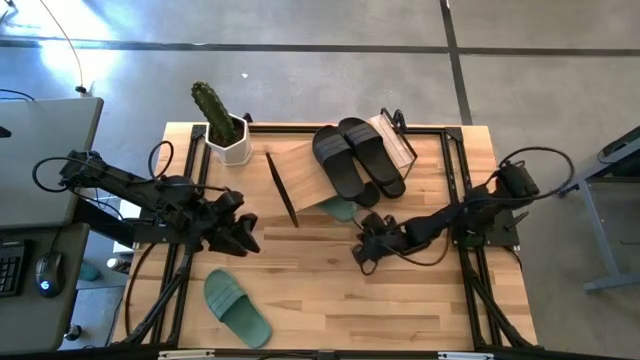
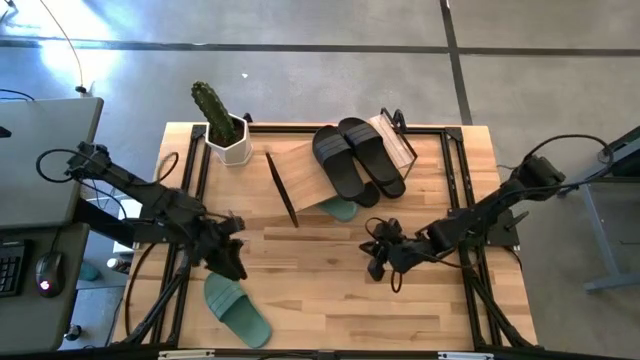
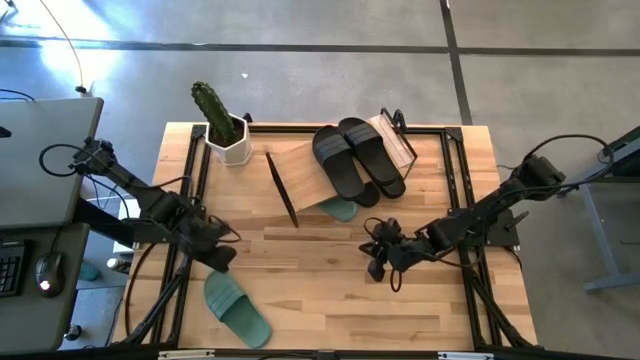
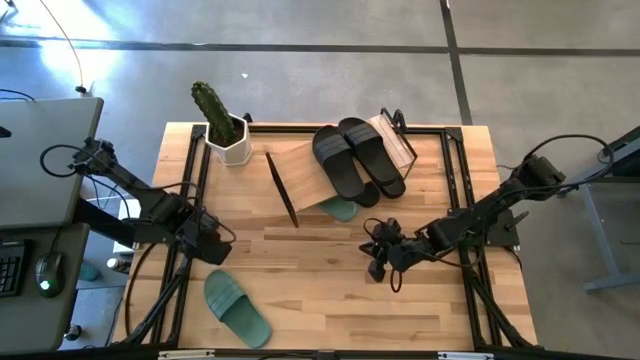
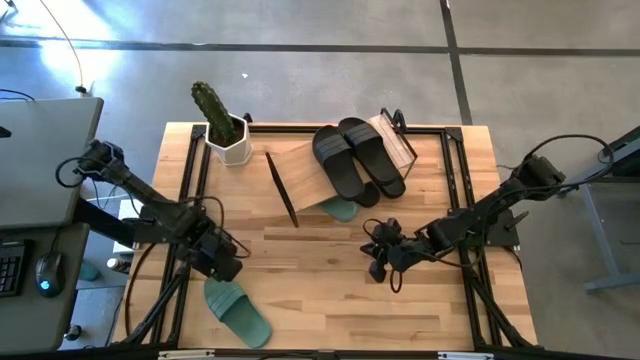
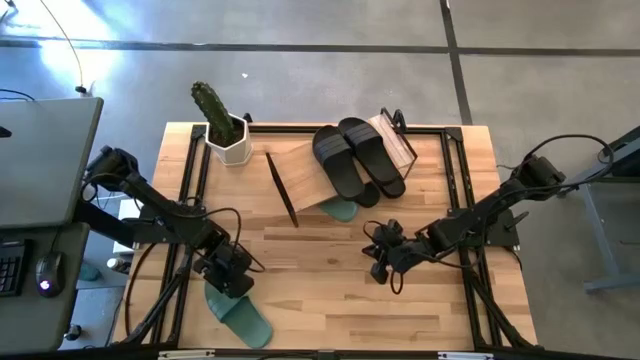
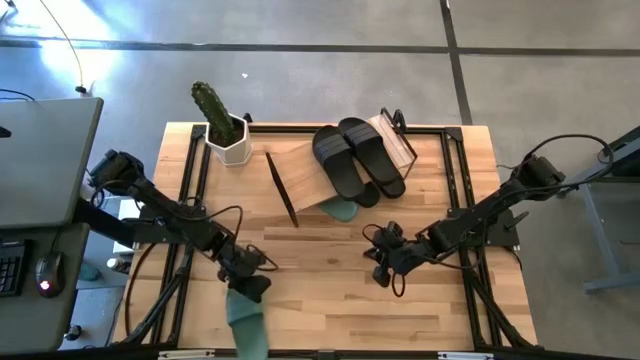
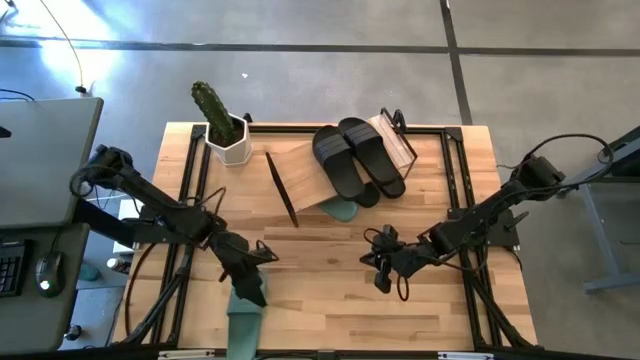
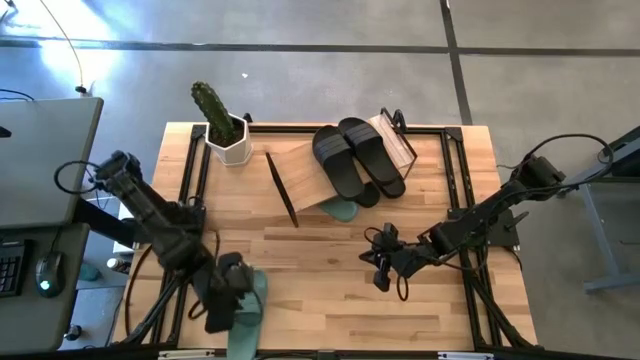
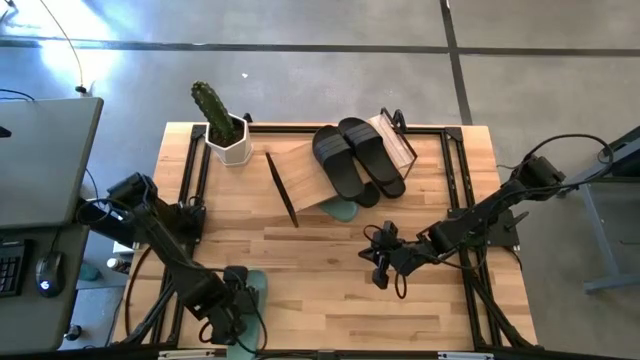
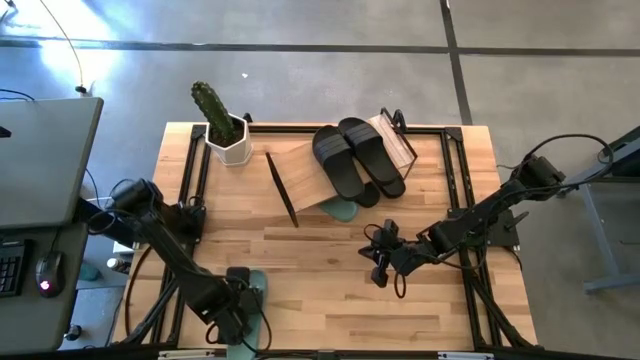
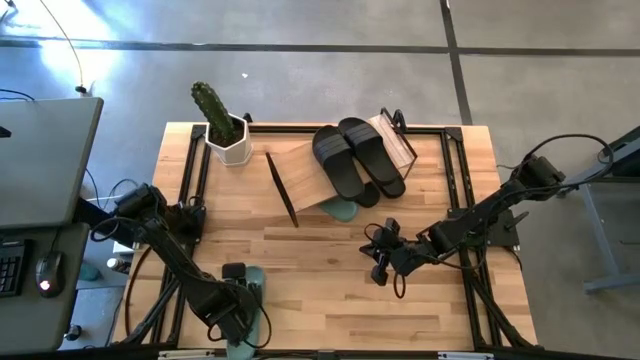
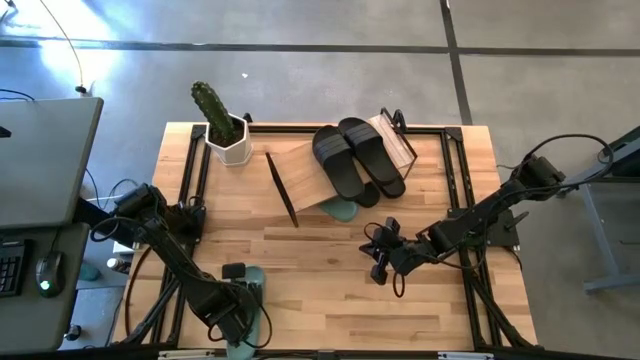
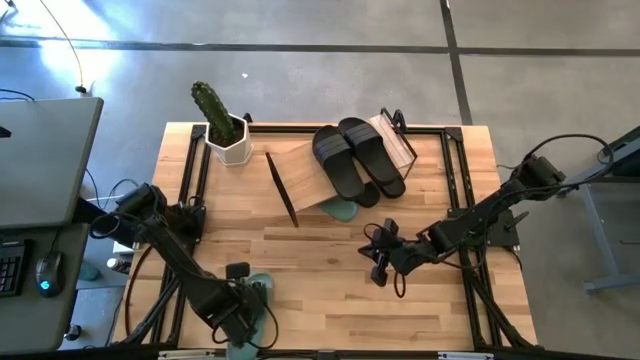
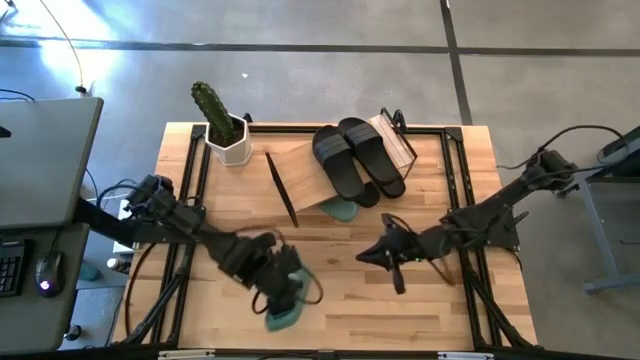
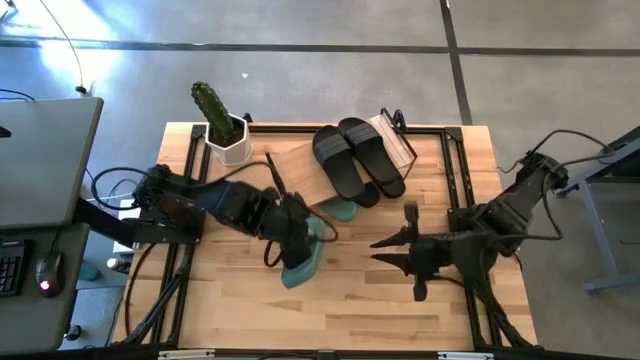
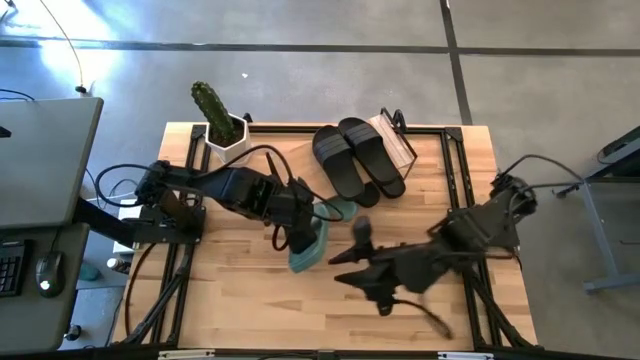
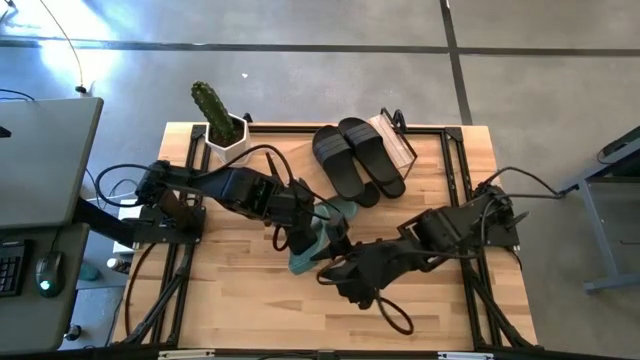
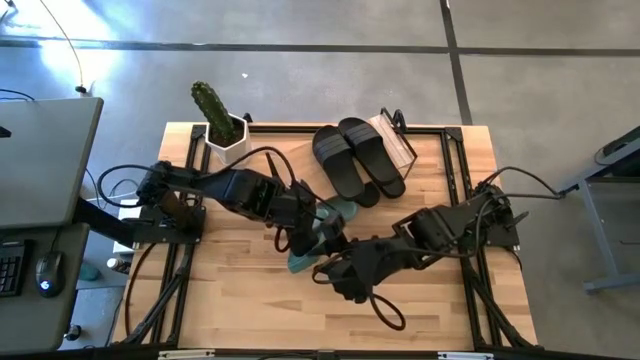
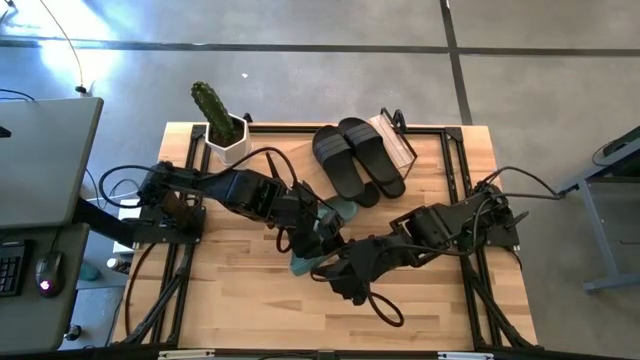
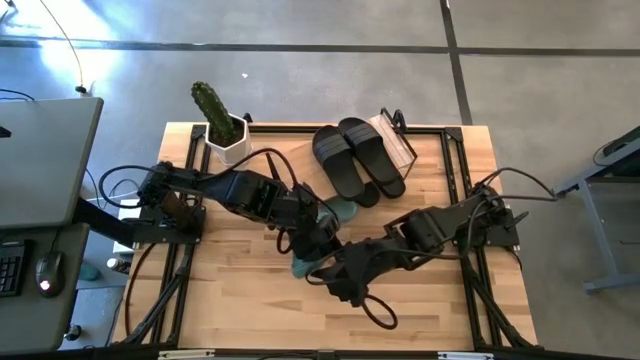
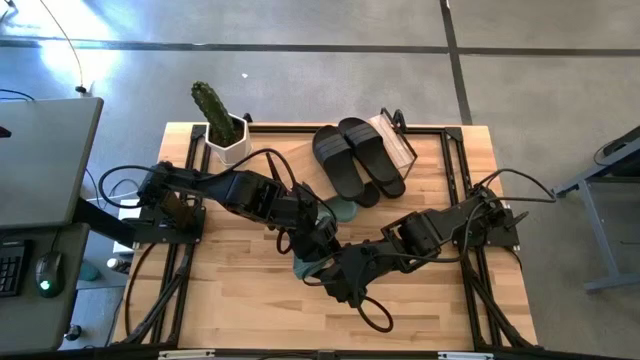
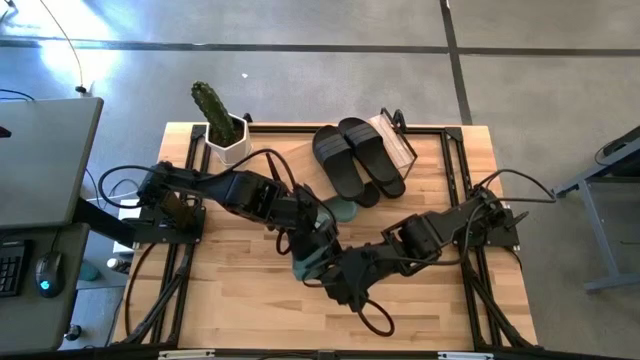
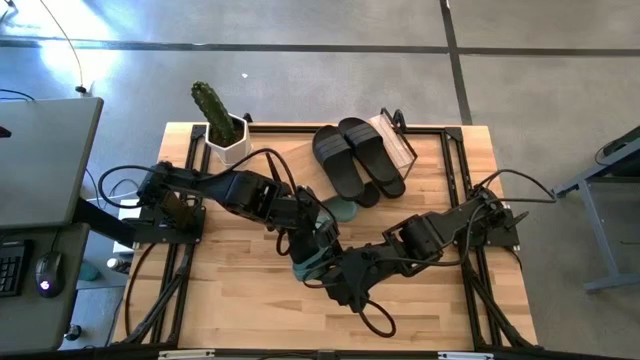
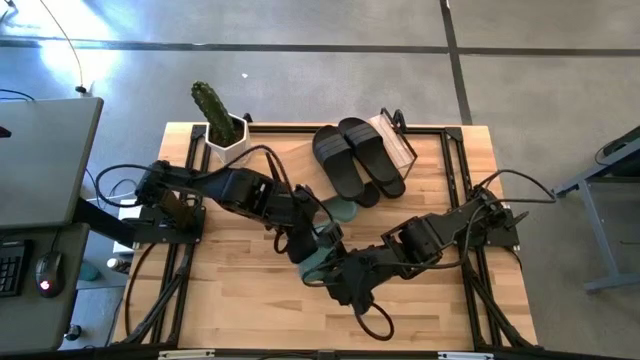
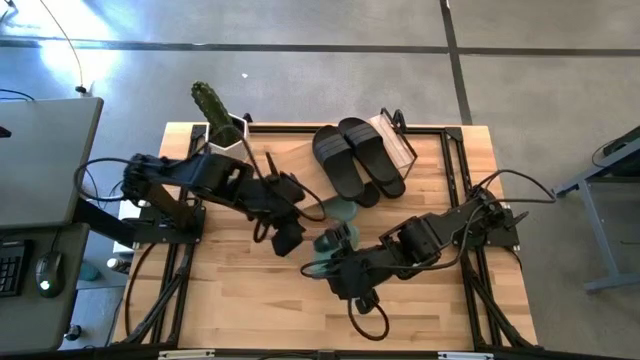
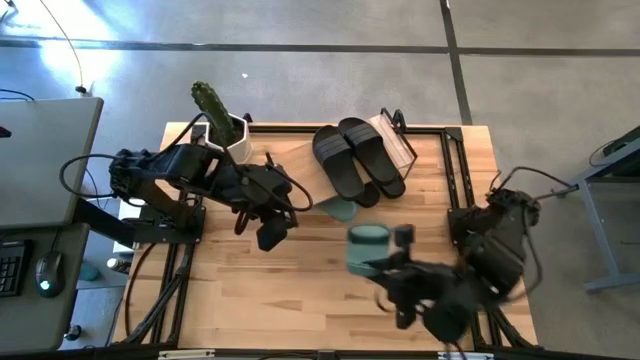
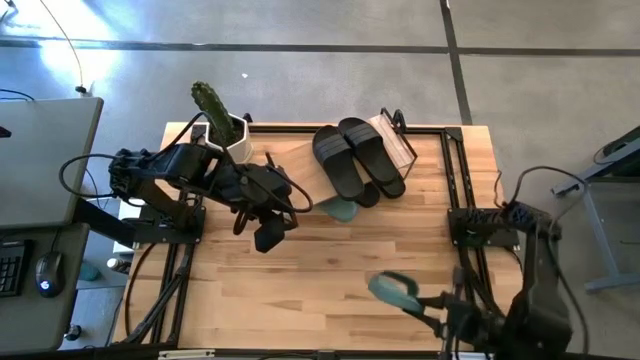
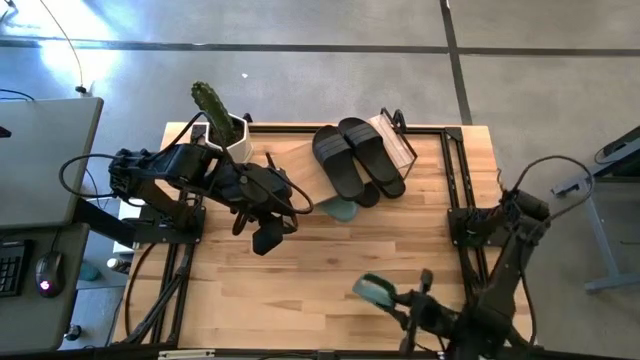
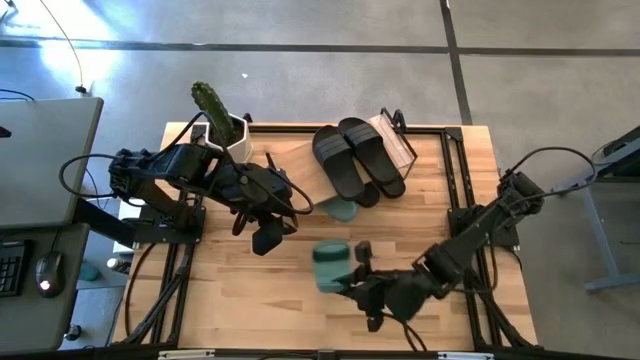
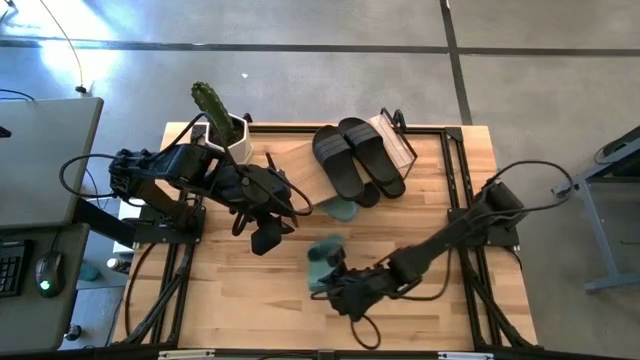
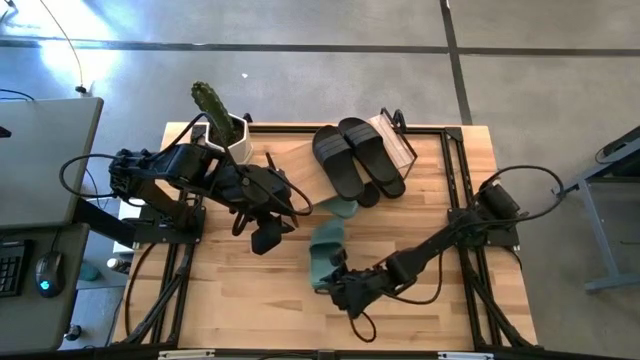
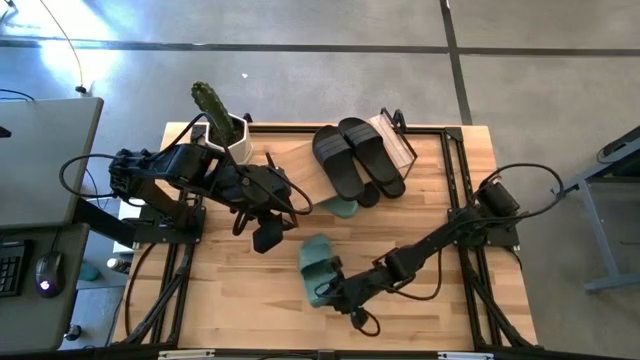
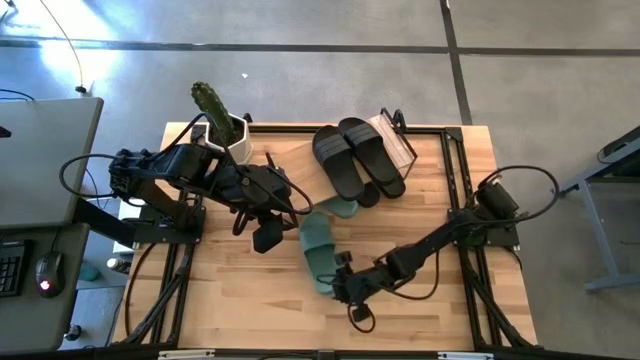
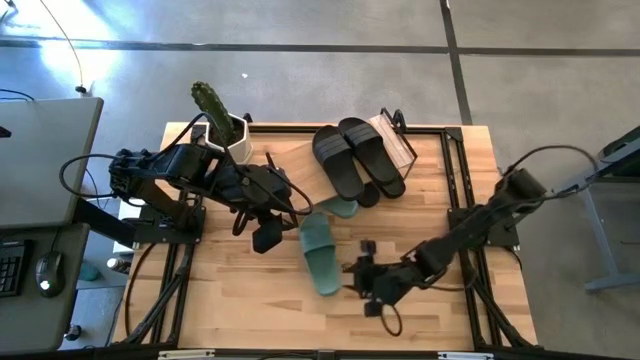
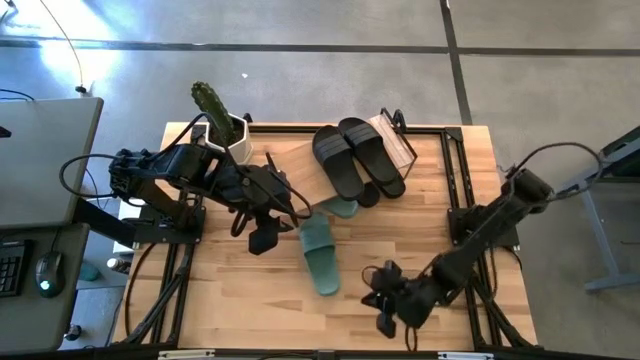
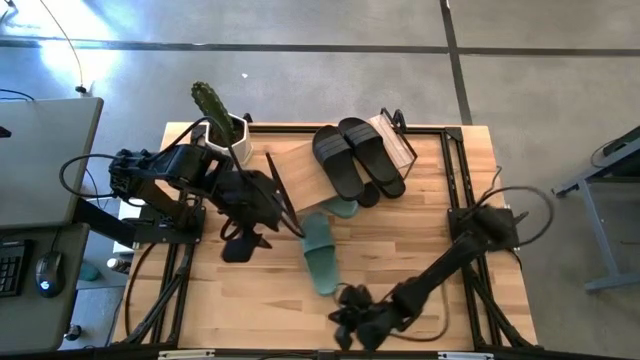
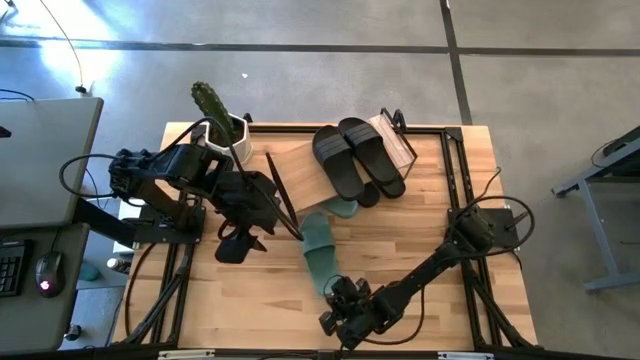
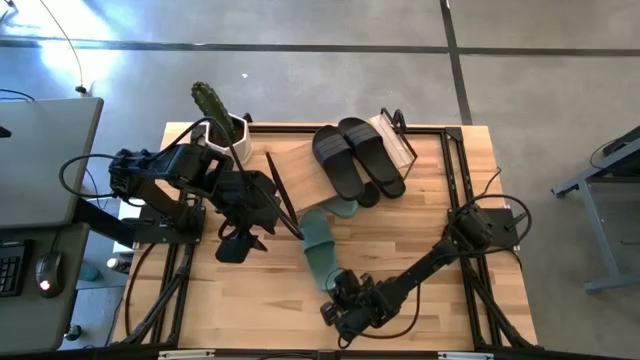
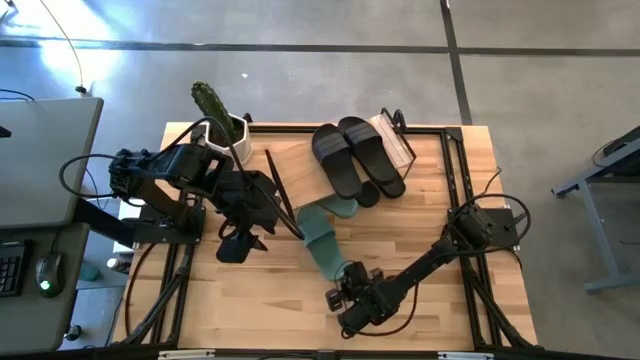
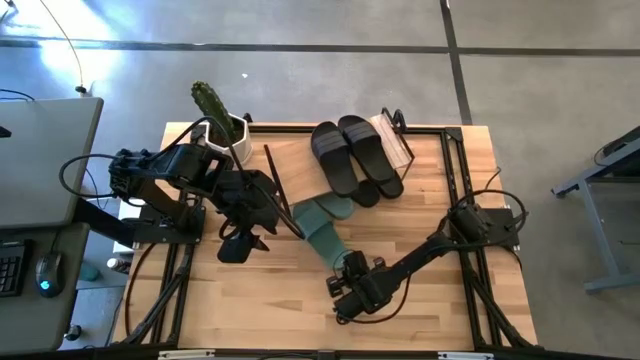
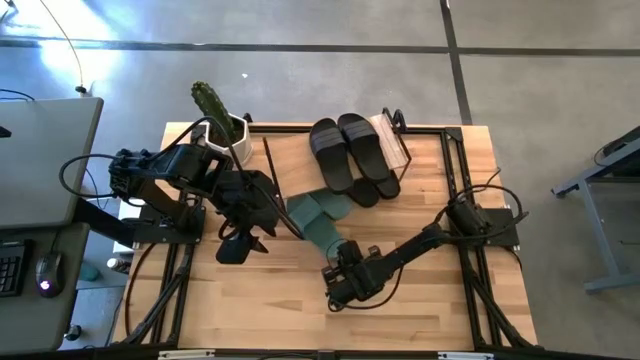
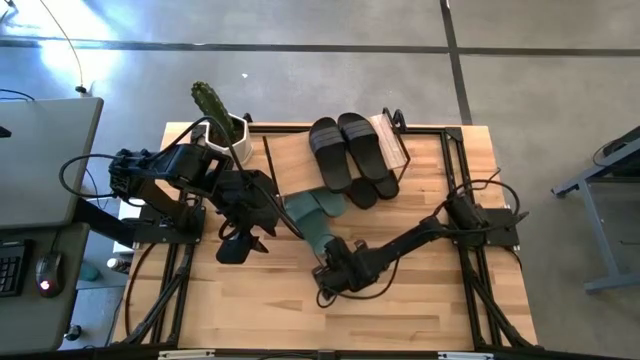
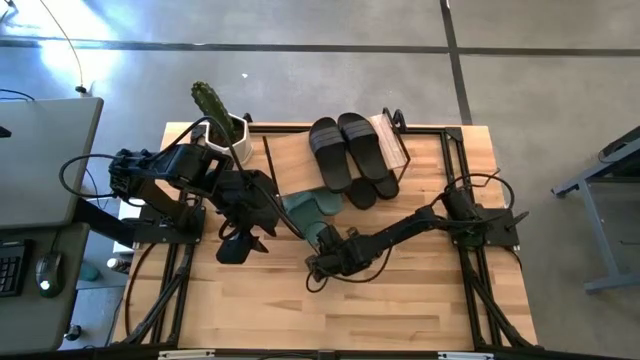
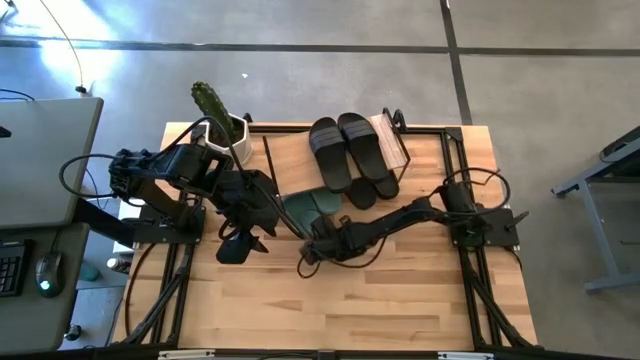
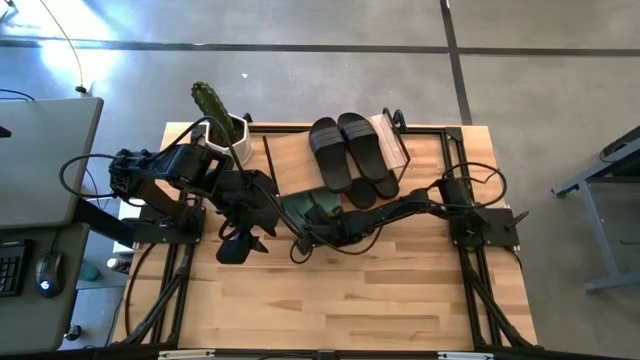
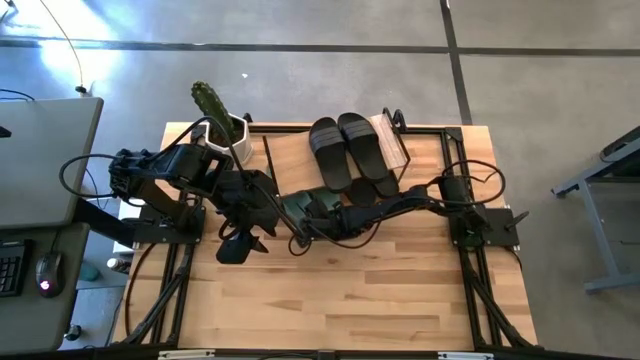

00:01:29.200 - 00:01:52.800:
Task: Pick and place slides into the shelf
Put the green slipper under the shelf
